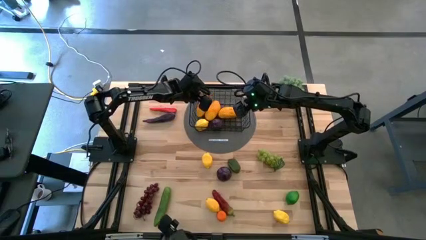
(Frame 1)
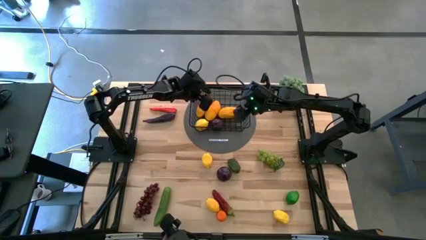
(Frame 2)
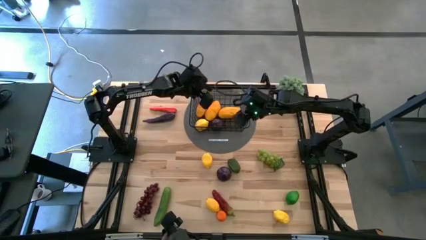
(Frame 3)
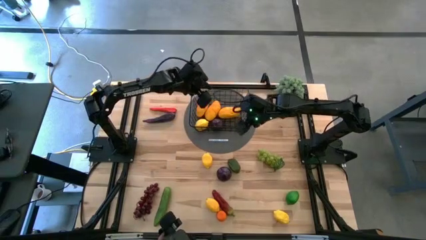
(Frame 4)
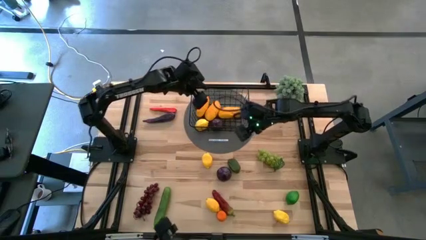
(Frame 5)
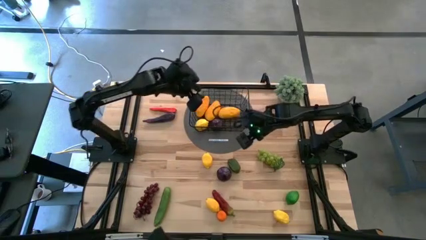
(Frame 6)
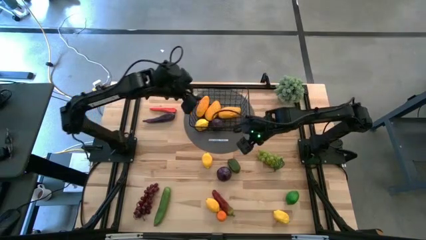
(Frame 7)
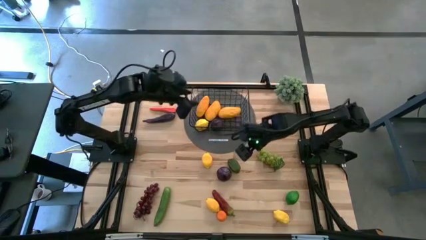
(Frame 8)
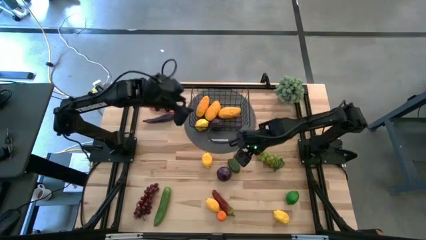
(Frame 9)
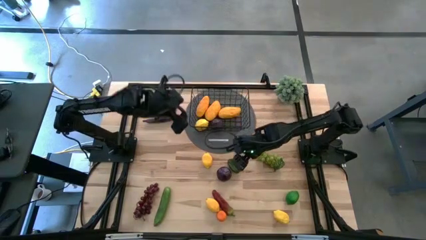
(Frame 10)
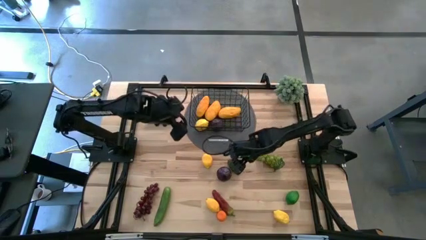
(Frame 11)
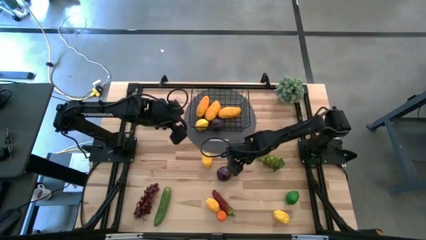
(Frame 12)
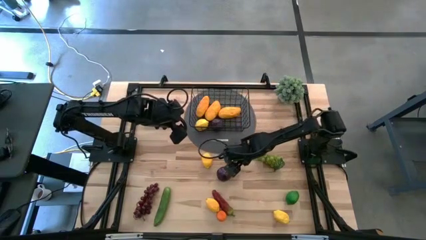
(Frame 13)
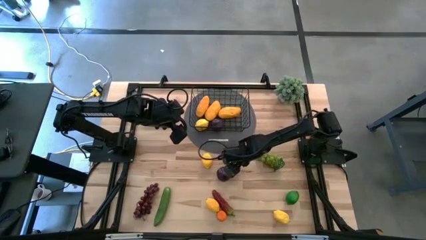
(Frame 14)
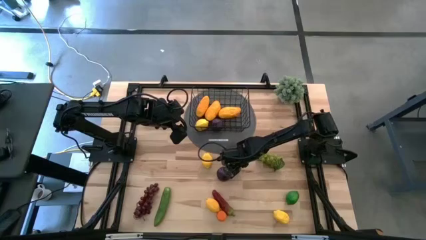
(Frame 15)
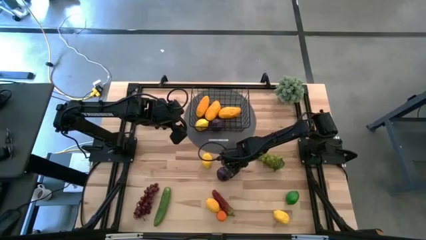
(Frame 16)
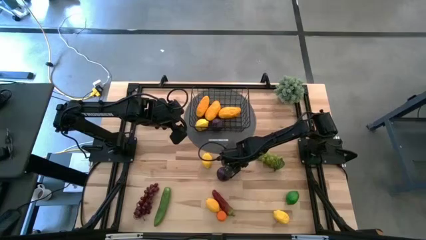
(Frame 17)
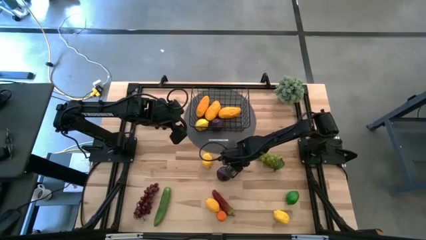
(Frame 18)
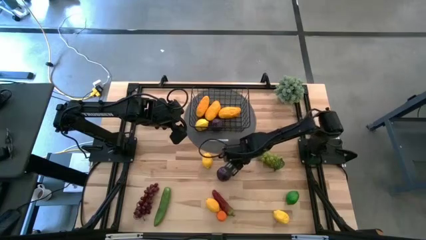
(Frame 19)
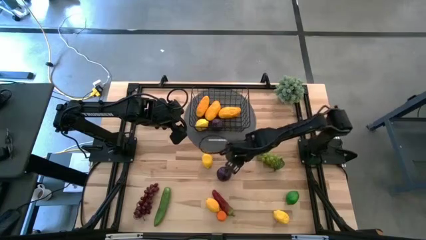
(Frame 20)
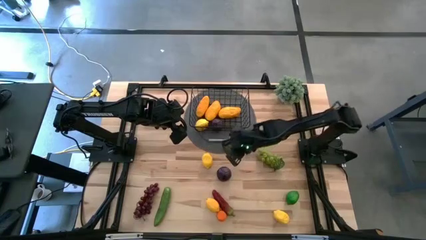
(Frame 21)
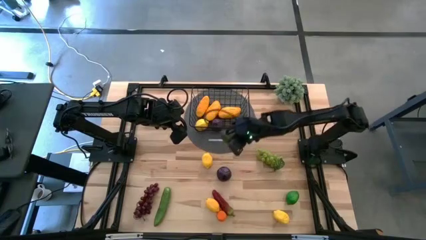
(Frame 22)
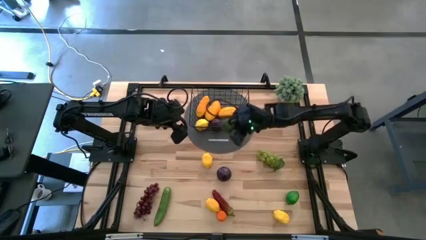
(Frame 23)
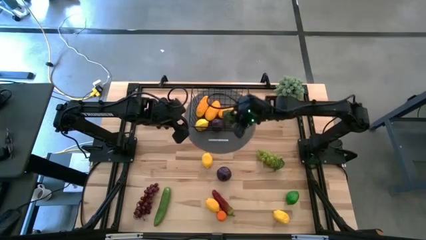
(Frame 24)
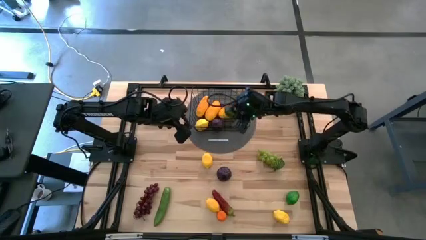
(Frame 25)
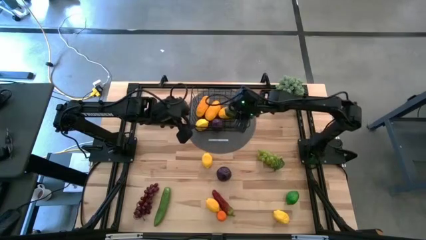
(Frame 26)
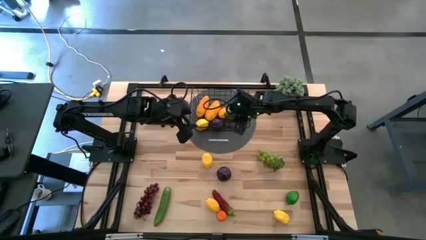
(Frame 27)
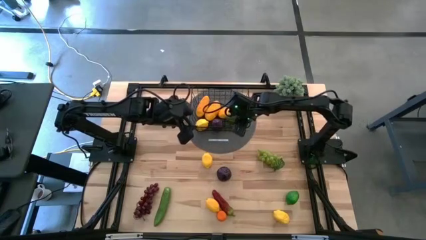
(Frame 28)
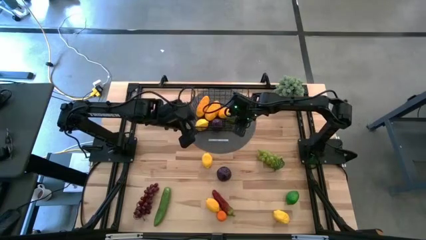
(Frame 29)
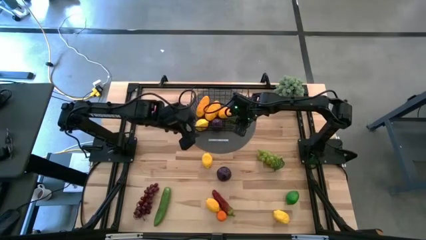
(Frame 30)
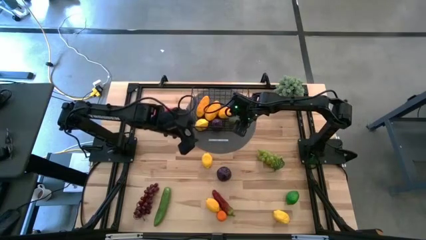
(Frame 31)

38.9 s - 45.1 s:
Task: Build produce basket
Put the green lime into the black wire basket

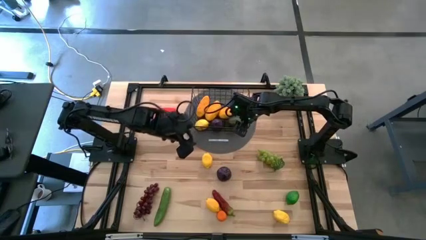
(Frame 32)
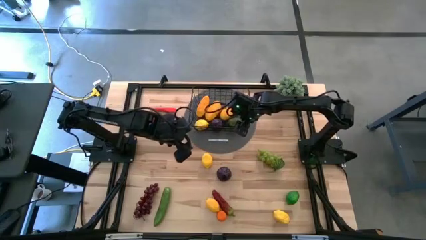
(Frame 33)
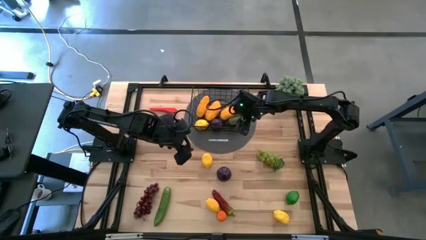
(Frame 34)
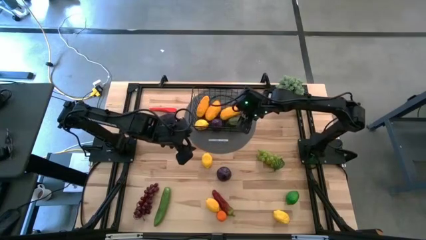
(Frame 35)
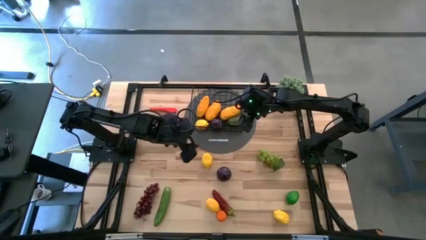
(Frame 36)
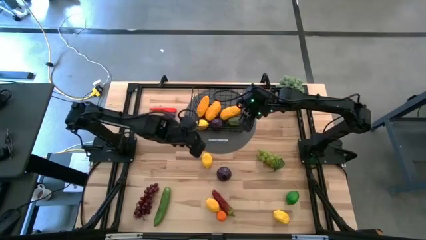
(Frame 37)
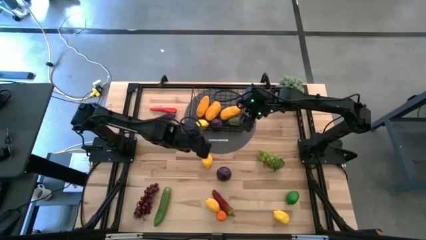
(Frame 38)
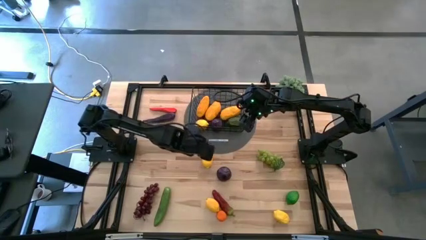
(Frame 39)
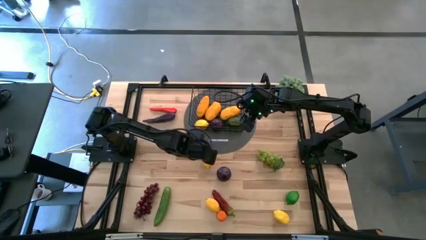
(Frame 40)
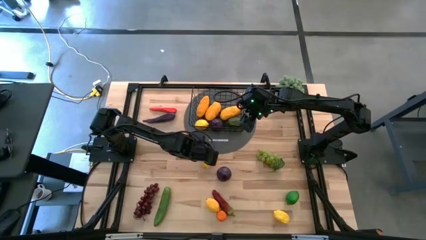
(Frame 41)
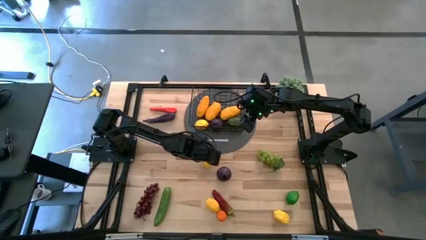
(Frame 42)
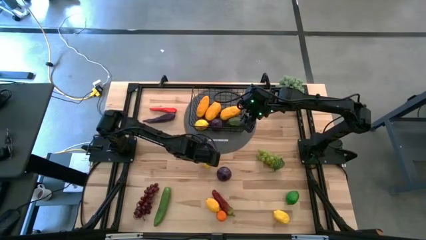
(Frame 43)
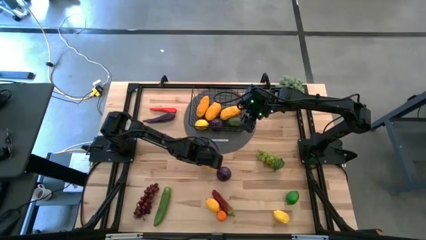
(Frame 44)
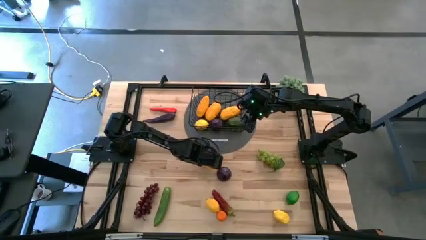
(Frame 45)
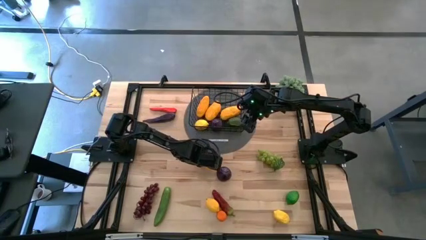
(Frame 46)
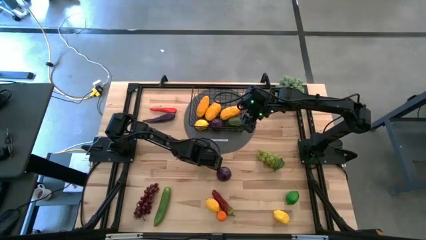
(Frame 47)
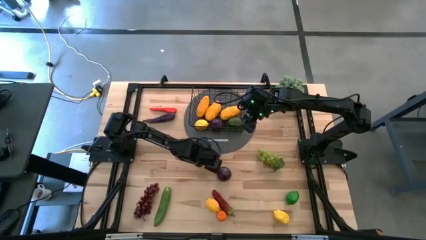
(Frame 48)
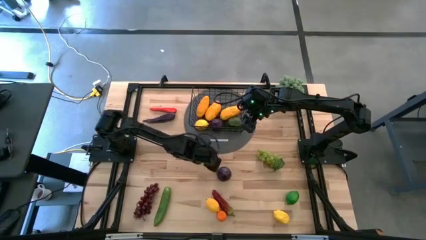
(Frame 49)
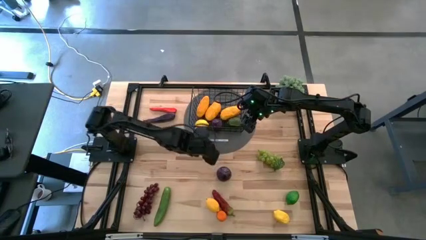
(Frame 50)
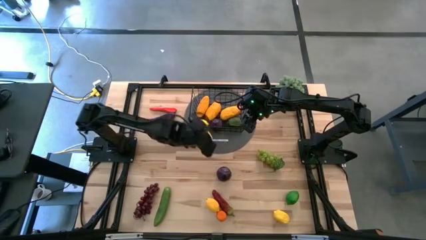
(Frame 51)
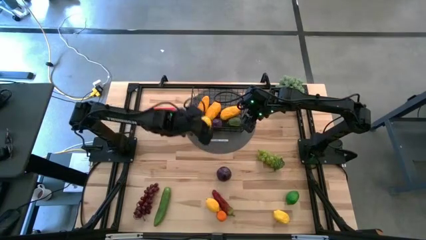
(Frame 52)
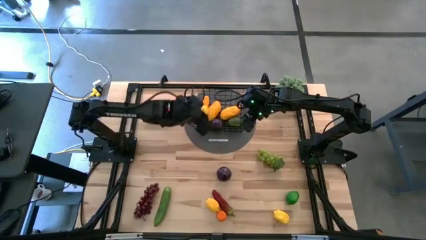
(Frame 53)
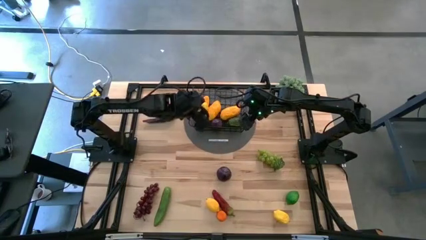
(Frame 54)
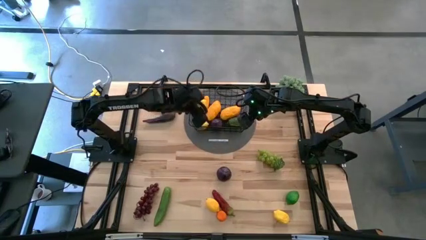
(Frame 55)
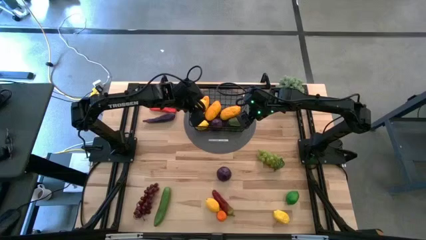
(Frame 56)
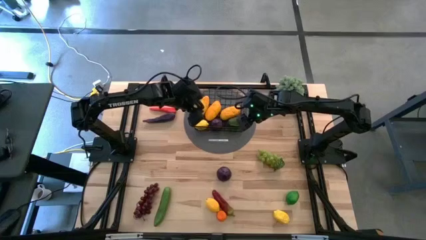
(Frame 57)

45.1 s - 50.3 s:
Put the yellow lemon into the black wire basket

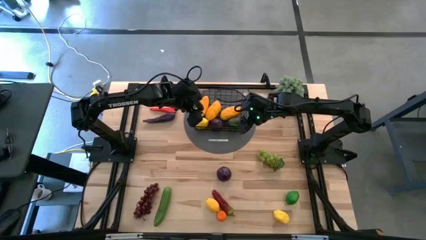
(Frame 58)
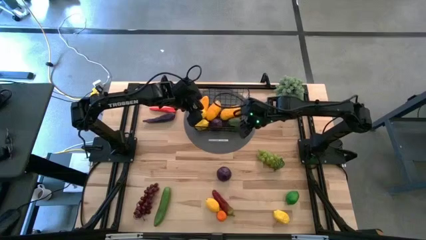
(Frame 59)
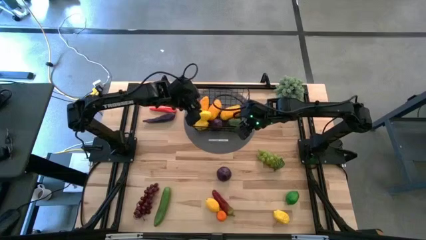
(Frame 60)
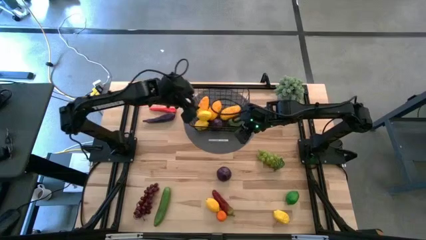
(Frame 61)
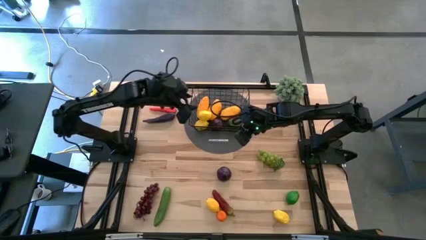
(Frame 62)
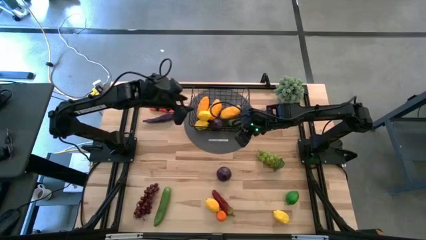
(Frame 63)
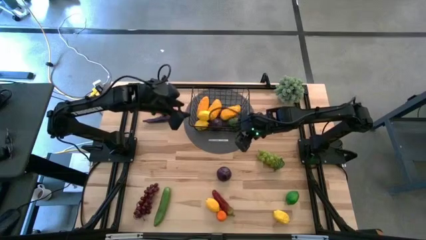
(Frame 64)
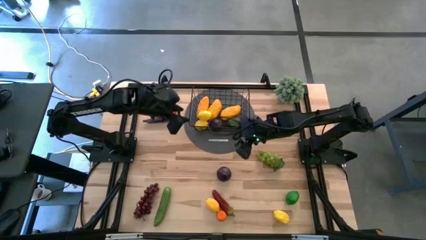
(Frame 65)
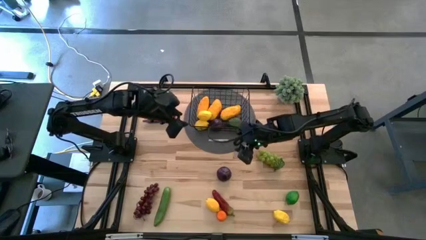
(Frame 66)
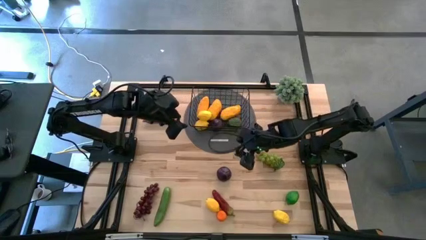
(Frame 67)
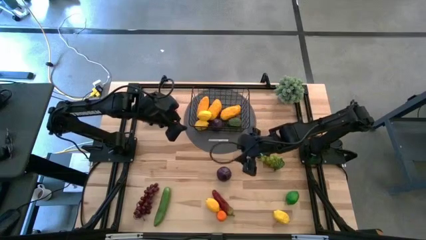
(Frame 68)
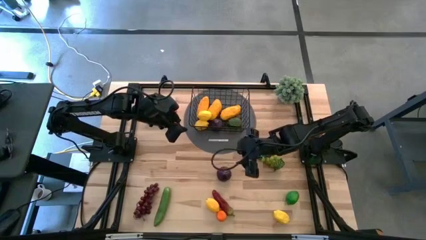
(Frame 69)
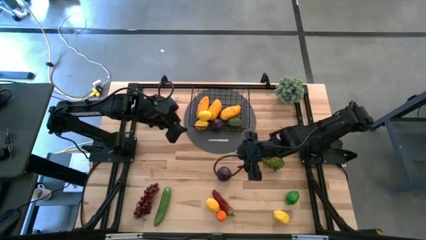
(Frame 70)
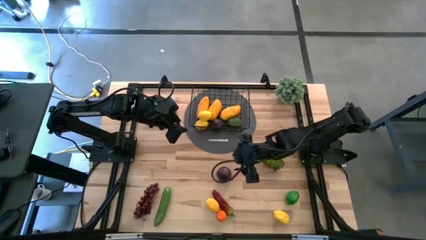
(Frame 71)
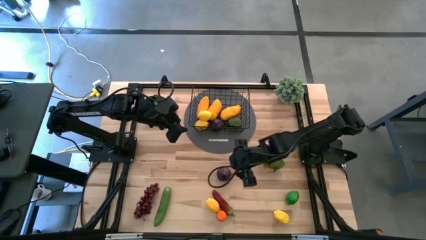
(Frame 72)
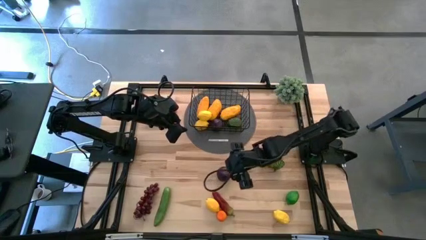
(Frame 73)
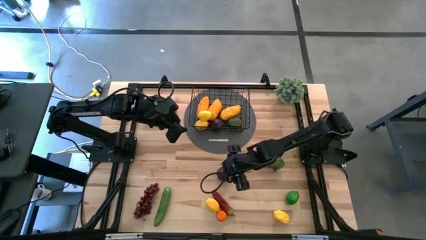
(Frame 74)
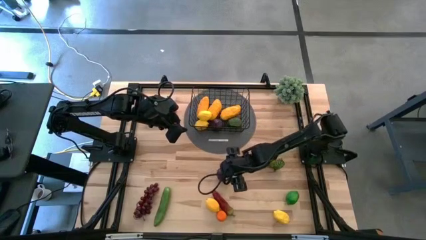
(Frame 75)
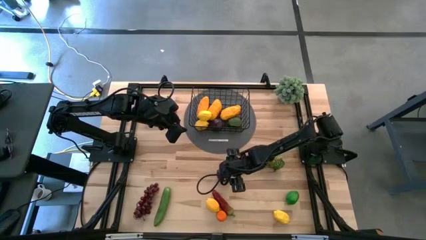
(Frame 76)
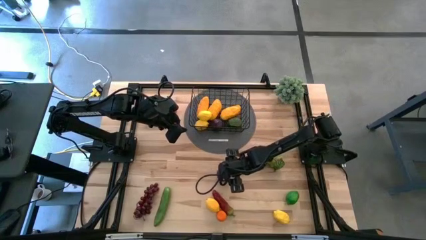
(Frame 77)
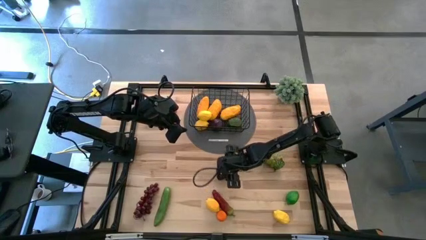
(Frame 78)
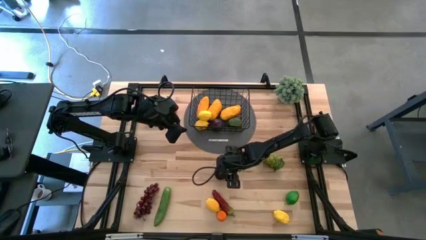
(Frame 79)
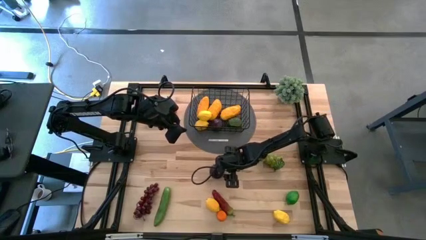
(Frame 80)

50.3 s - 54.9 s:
Put the purple plum into the black wire basket

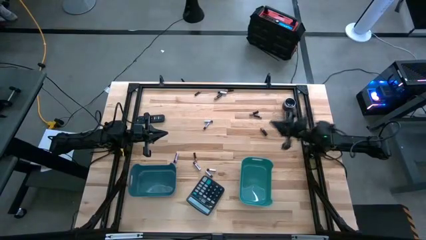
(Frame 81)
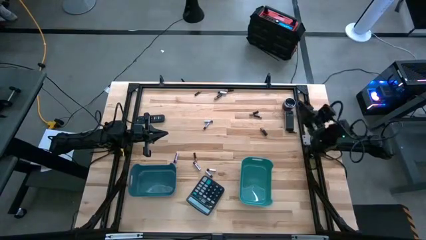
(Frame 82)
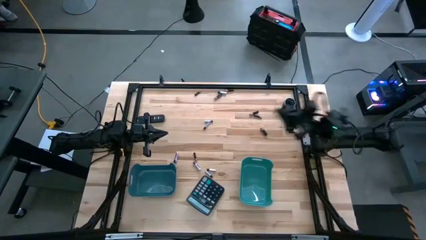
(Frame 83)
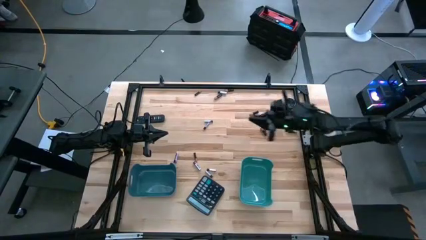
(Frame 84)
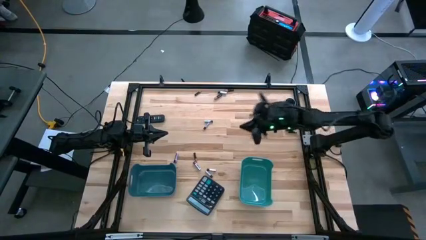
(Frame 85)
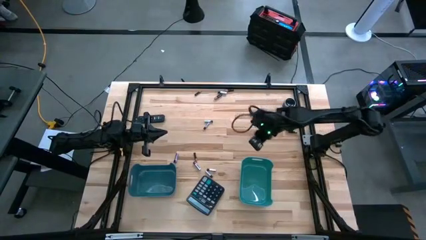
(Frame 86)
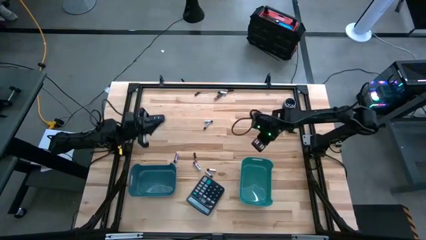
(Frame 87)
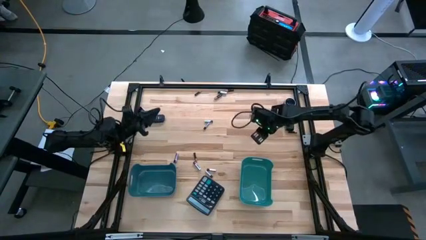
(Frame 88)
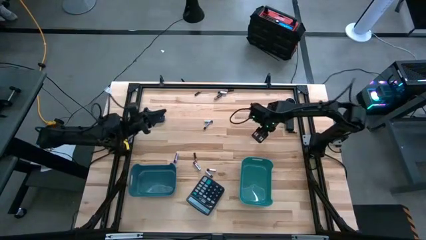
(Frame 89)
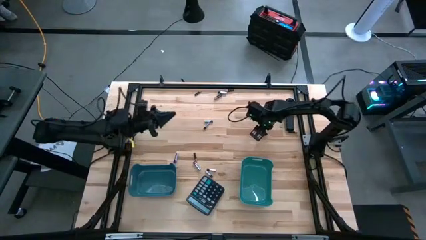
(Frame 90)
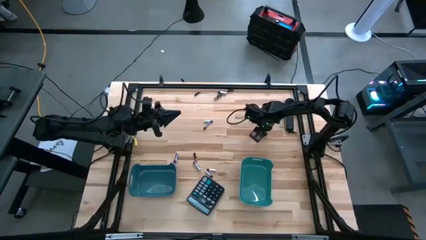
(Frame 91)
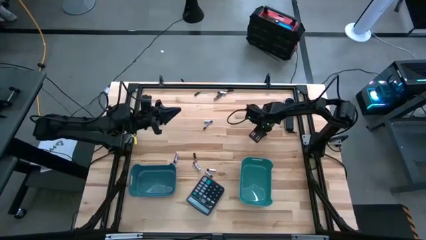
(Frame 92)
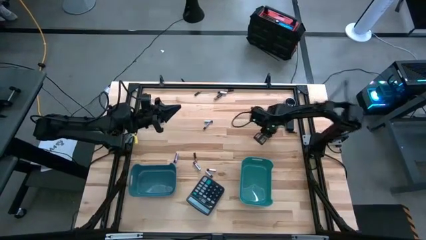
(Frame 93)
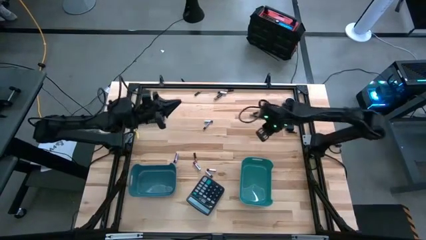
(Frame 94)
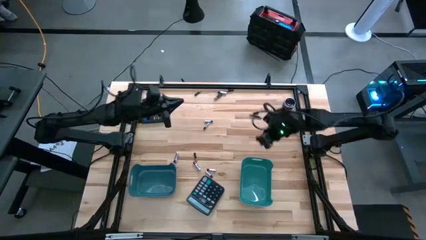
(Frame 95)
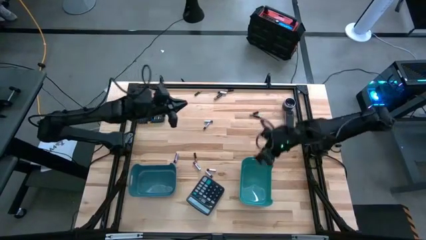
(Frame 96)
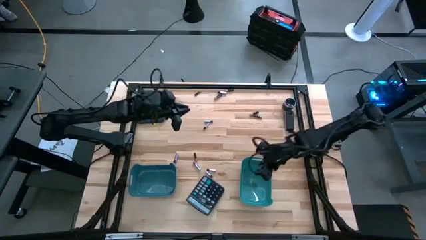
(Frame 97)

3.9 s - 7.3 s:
Task: Sort batteries
Put the black battery into the dark green bin
